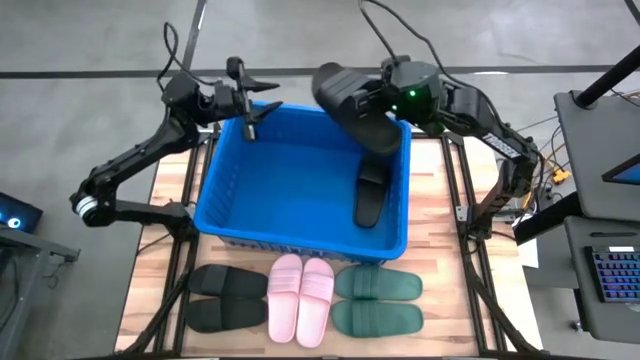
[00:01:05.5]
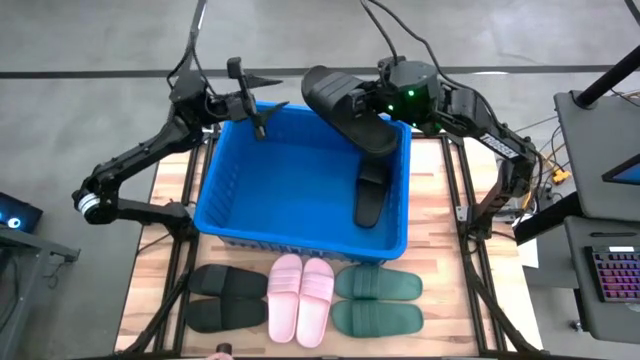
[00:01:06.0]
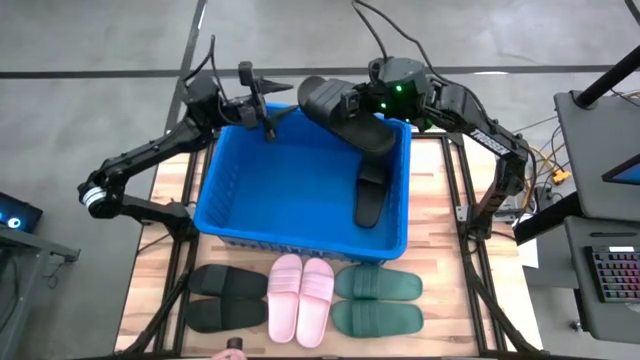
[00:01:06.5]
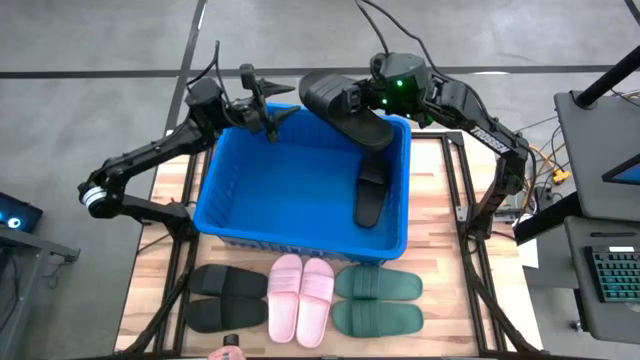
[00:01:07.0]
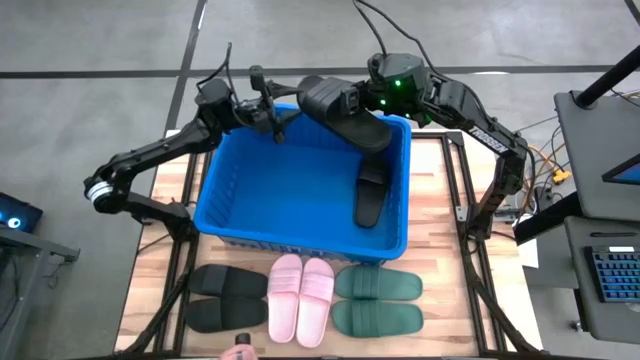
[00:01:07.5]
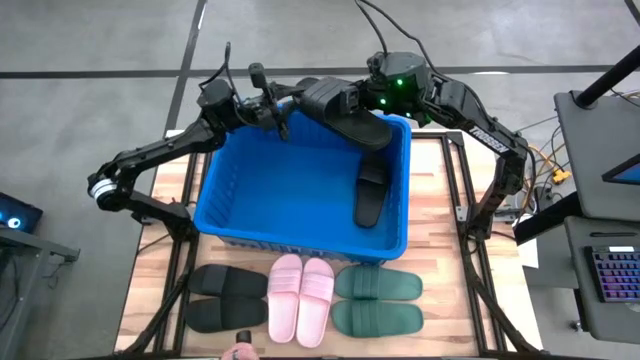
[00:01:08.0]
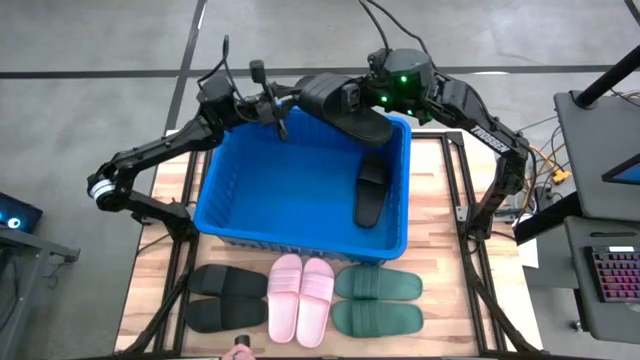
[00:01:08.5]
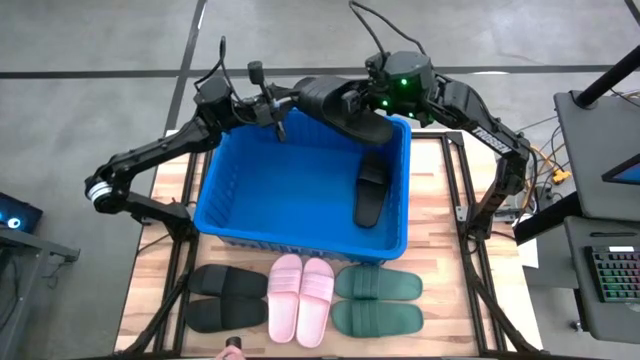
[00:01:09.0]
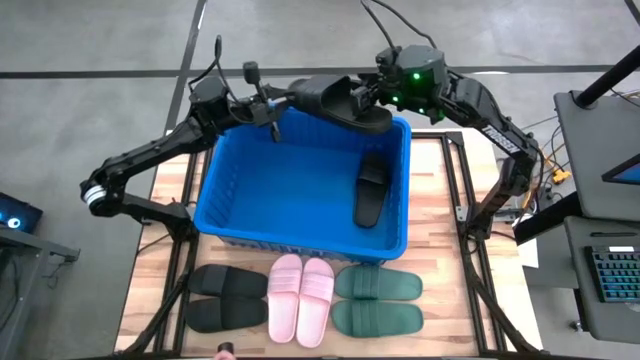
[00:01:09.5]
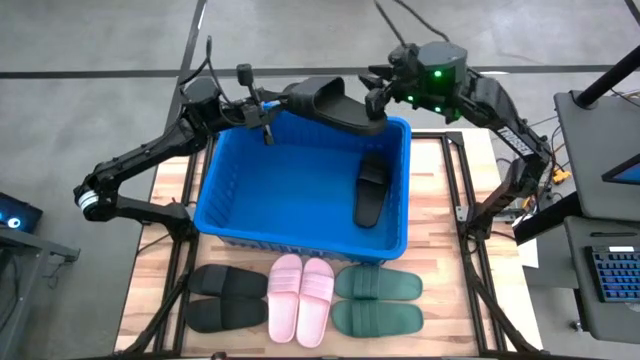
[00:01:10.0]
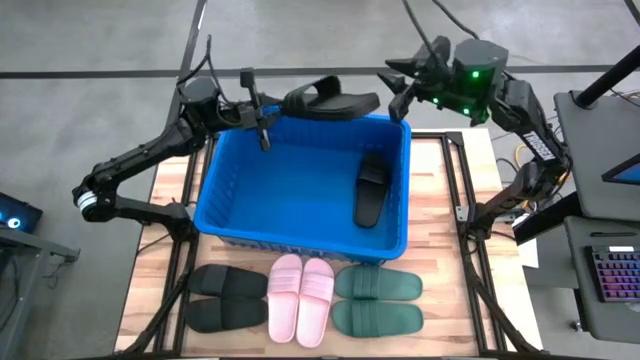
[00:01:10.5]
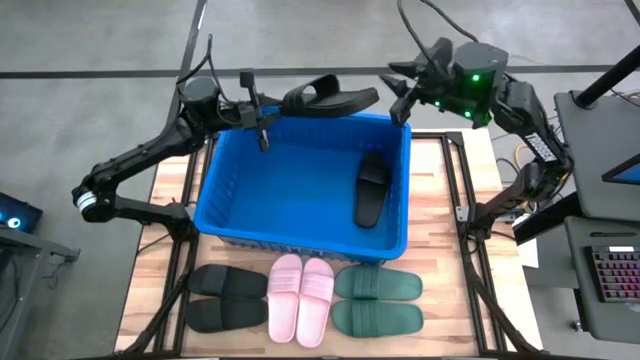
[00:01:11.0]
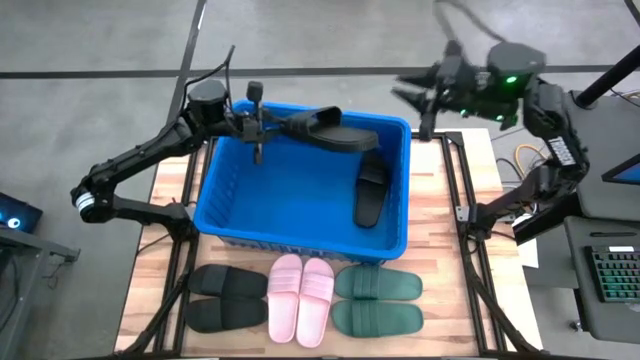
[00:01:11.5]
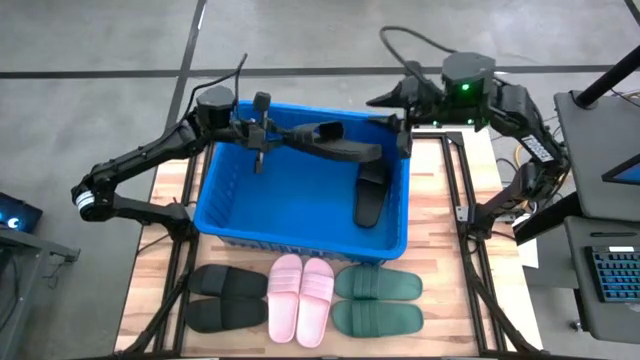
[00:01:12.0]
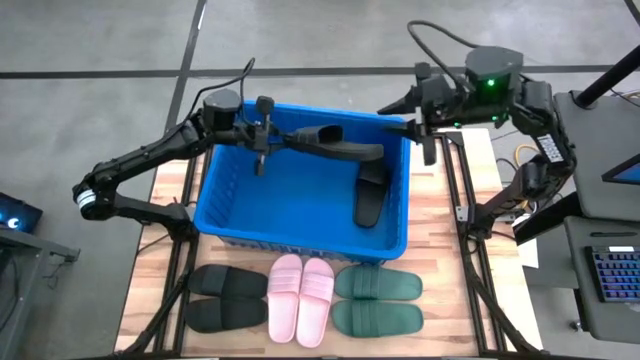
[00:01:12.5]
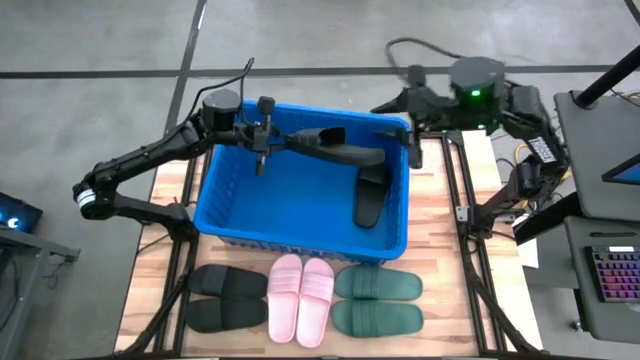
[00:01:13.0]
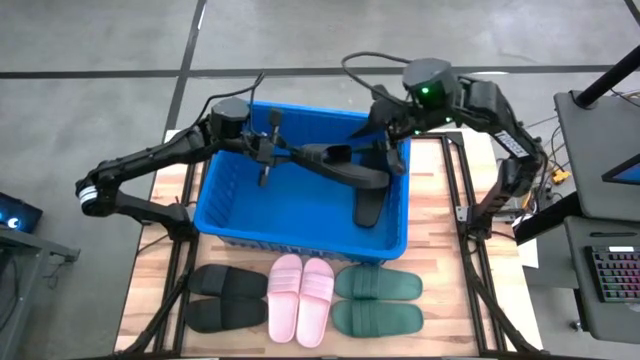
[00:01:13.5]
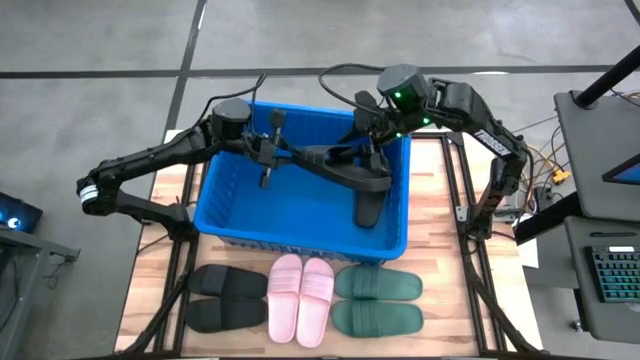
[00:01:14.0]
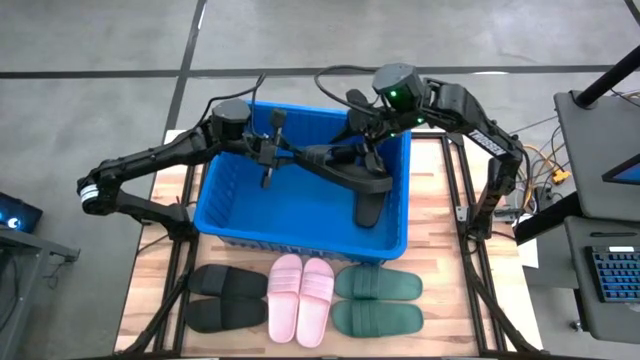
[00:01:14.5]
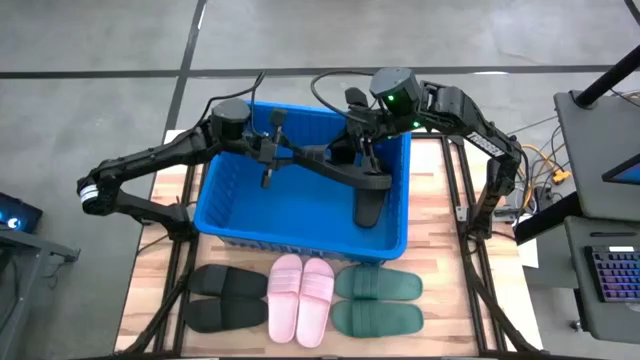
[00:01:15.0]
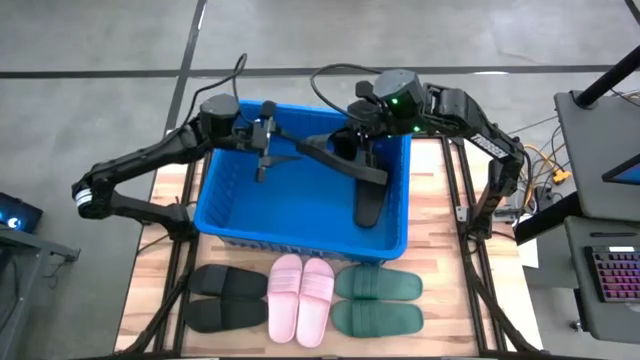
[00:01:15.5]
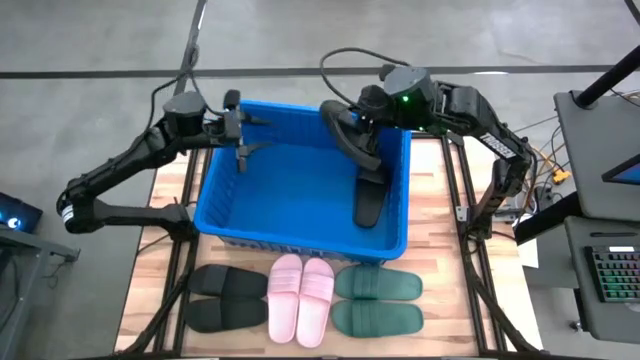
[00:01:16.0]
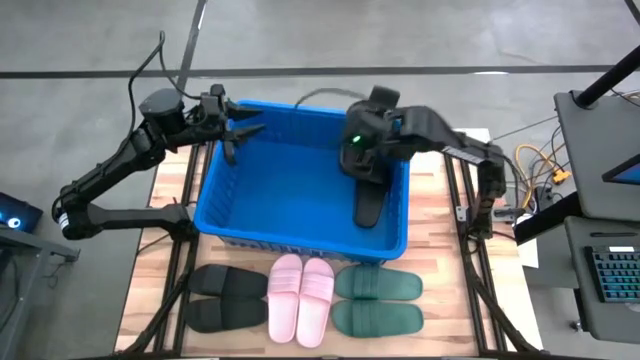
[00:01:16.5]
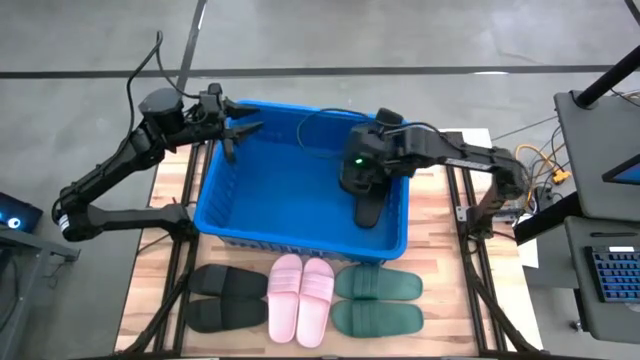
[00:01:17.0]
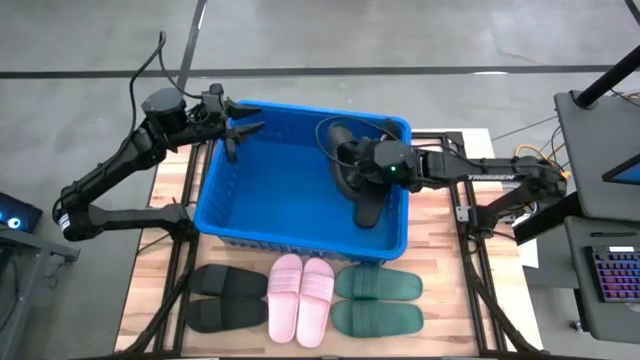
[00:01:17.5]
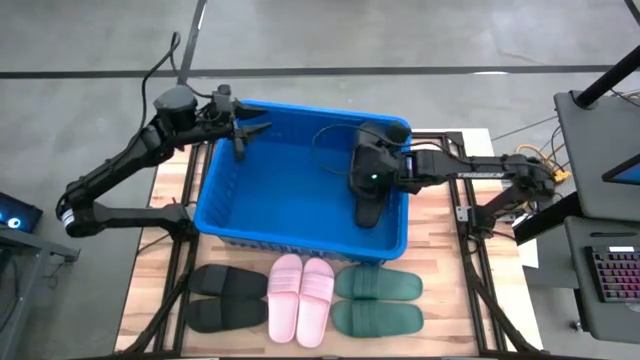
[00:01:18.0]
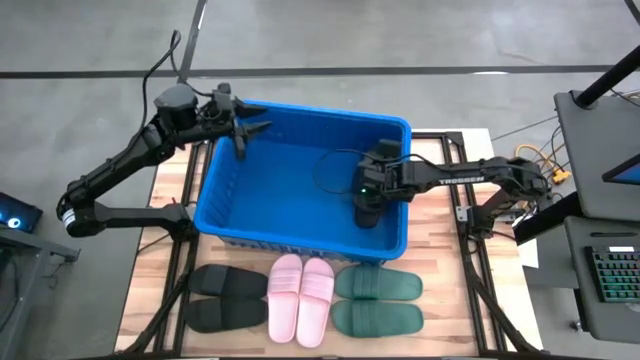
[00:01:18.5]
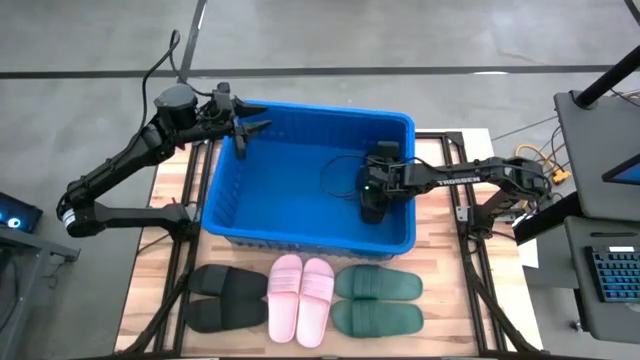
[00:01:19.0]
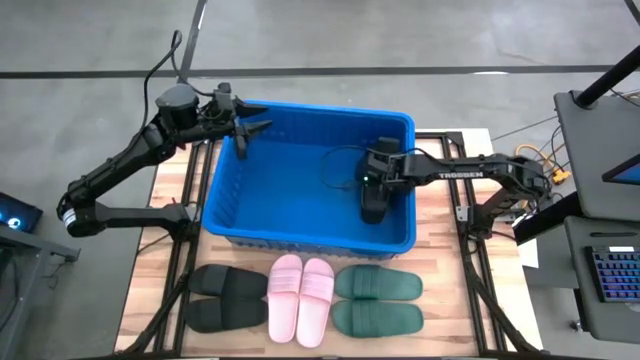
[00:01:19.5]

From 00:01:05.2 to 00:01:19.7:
Task: Pick and place slides into bin
Put the black slide into the blue bin

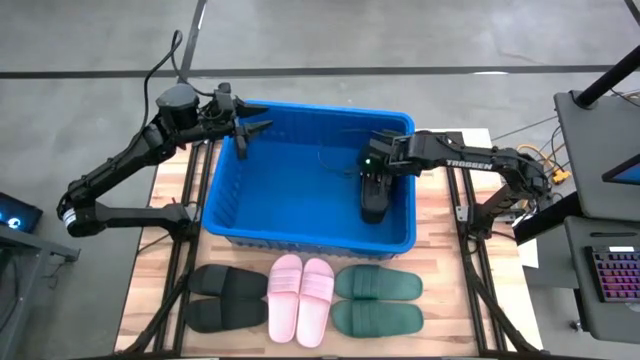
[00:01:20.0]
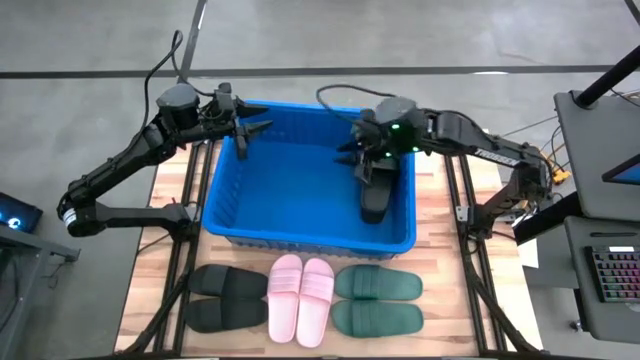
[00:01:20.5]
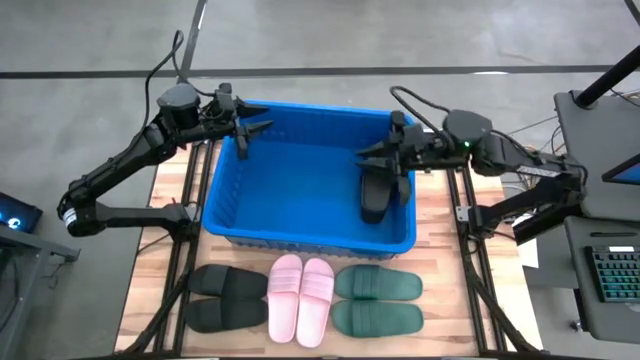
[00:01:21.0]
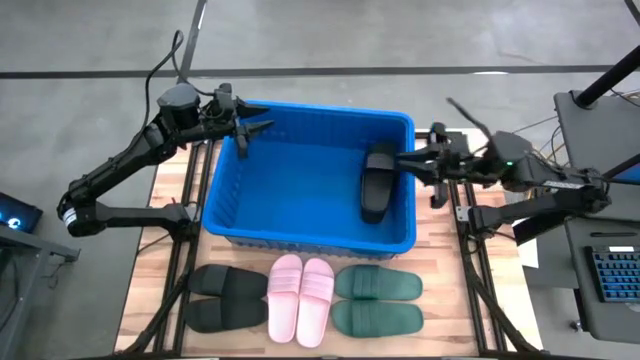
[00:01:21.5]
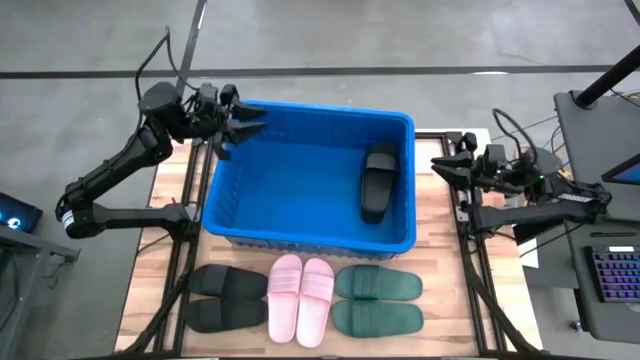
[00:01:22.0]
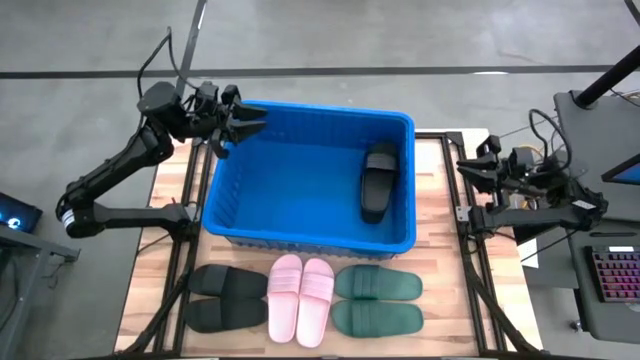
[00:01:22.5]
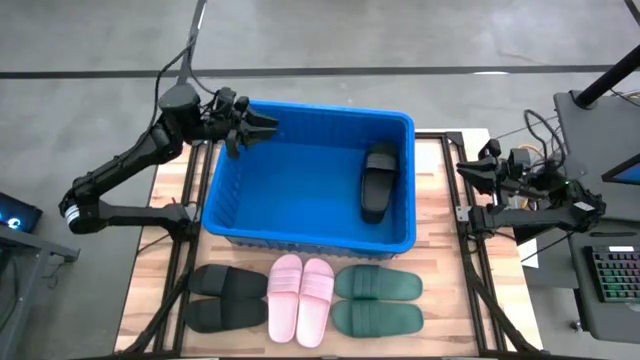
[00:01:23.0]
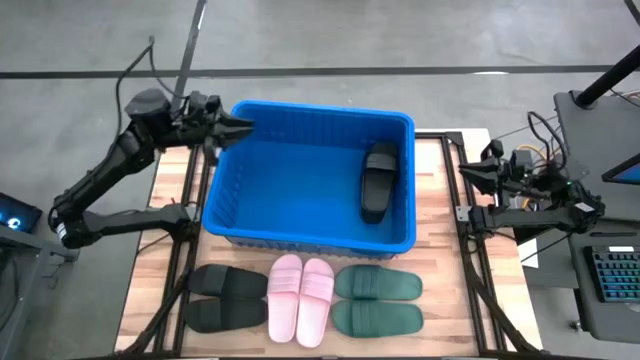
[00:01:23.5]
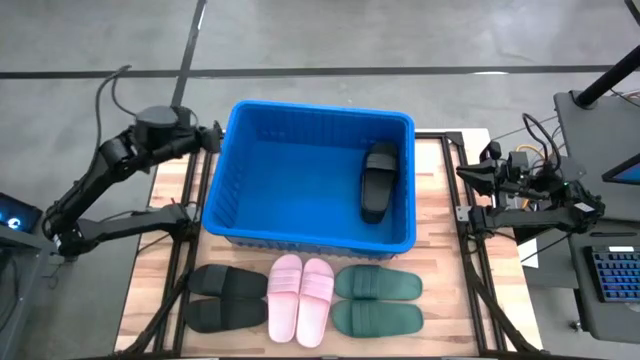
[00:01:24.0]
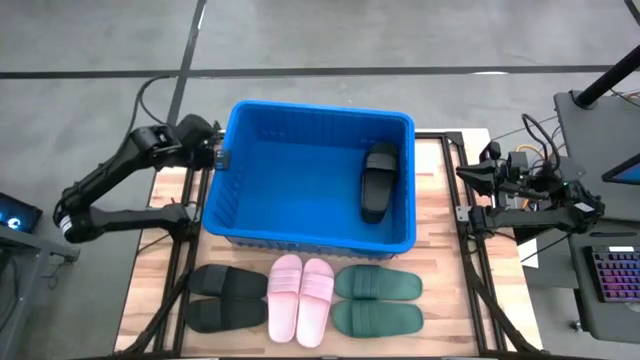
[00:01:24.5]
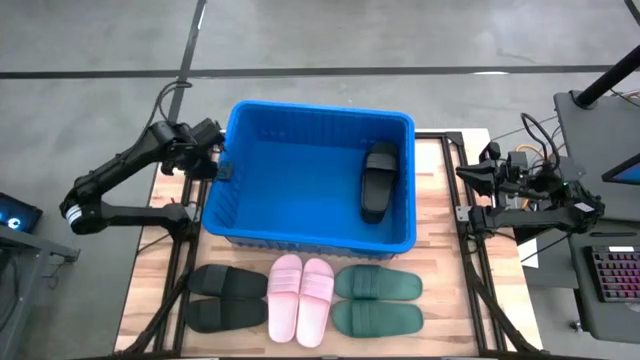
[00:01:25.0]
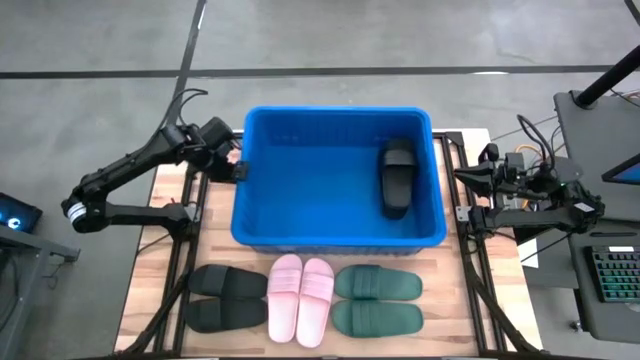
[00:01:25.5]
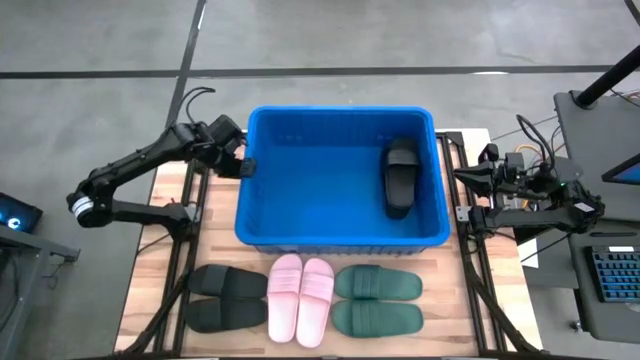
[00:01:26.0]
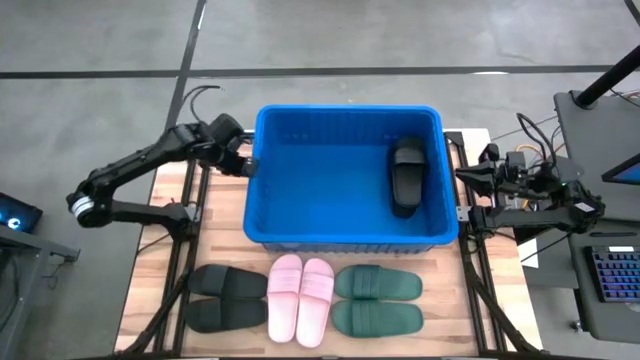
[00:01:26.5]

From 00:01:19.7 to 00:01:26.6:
Adjust the blue bin
